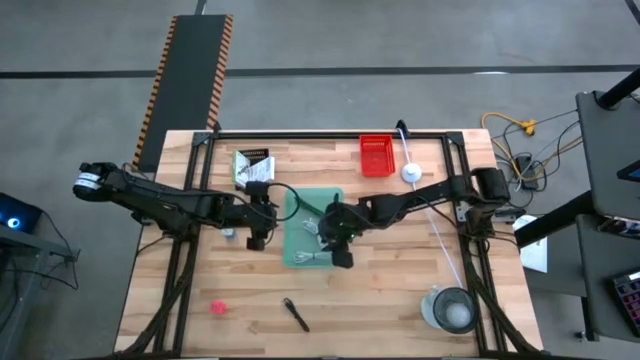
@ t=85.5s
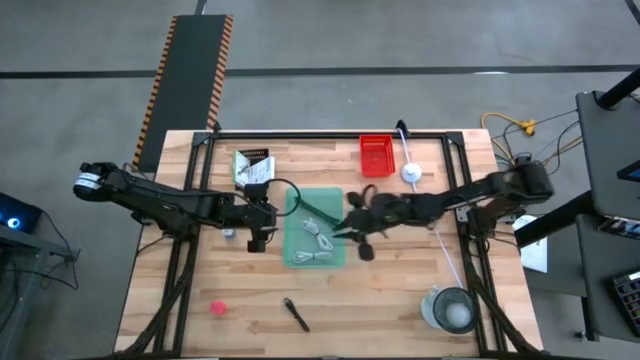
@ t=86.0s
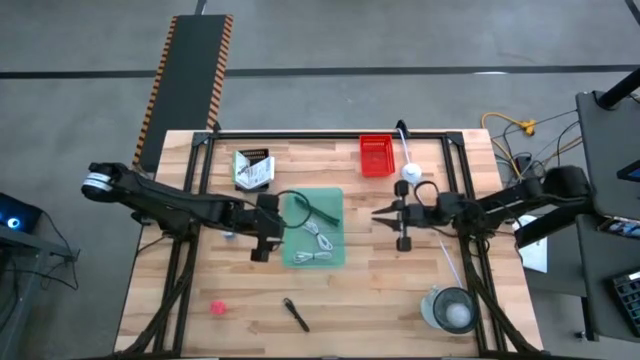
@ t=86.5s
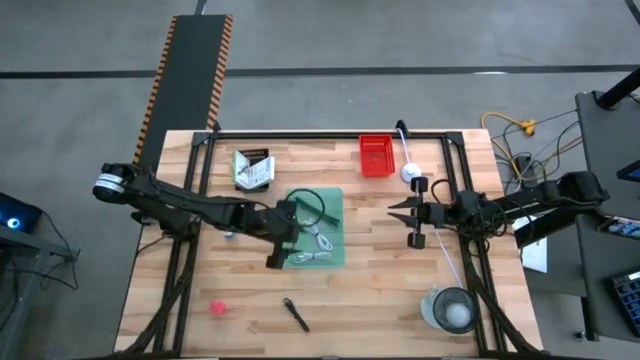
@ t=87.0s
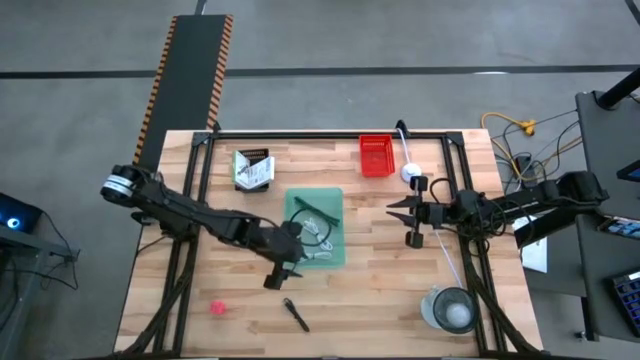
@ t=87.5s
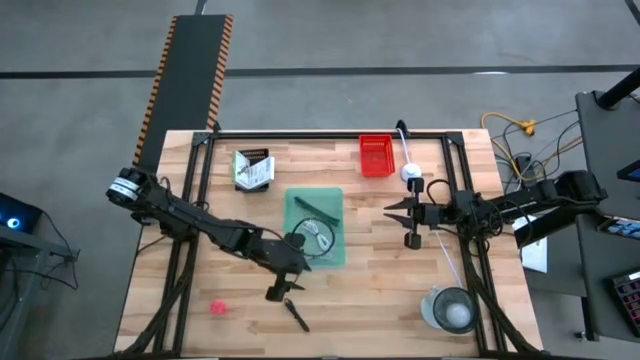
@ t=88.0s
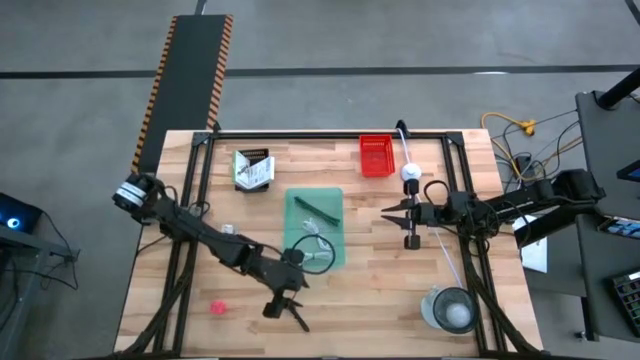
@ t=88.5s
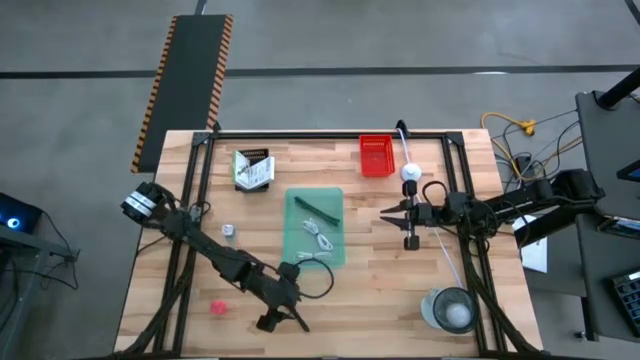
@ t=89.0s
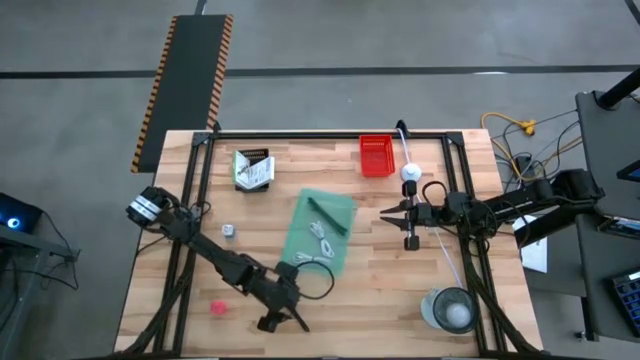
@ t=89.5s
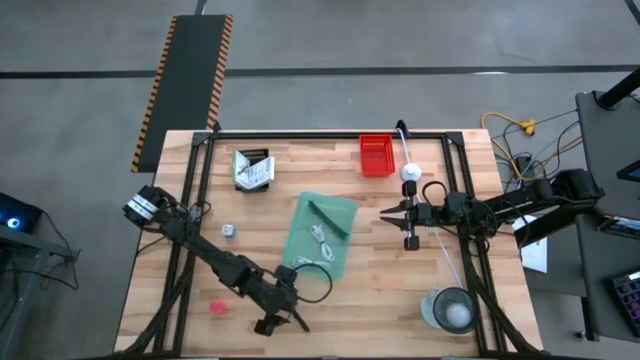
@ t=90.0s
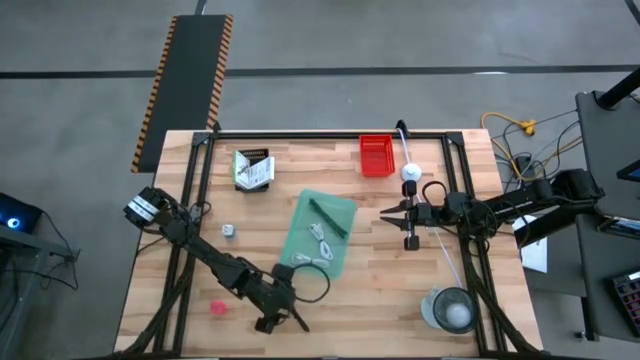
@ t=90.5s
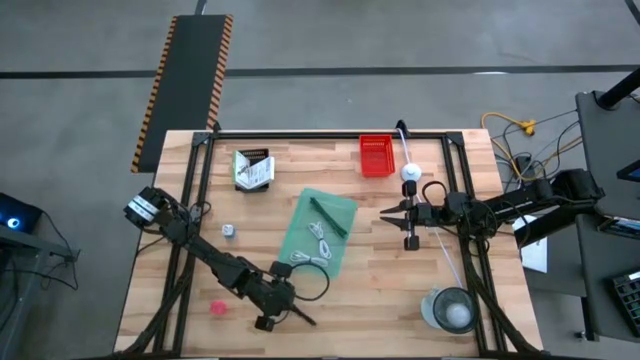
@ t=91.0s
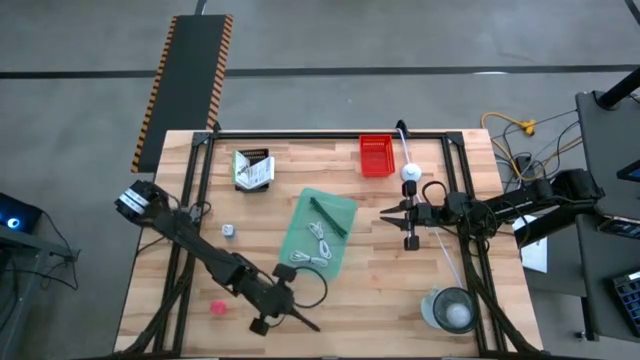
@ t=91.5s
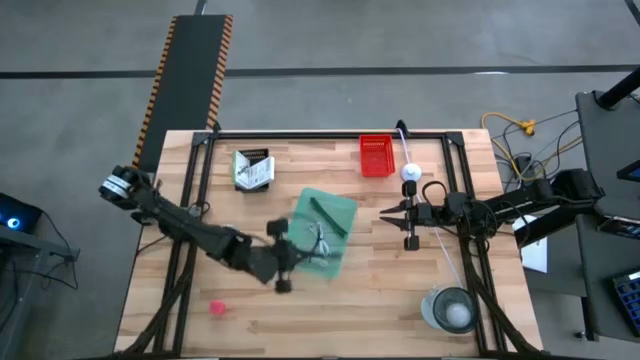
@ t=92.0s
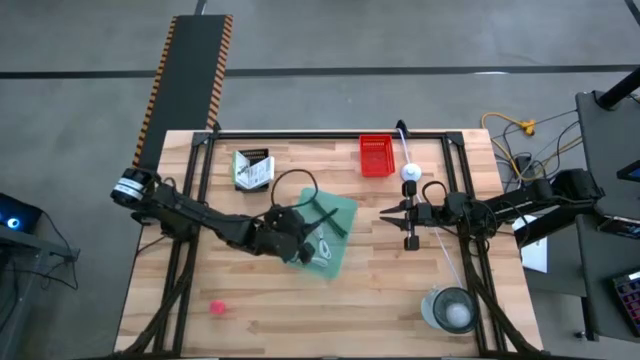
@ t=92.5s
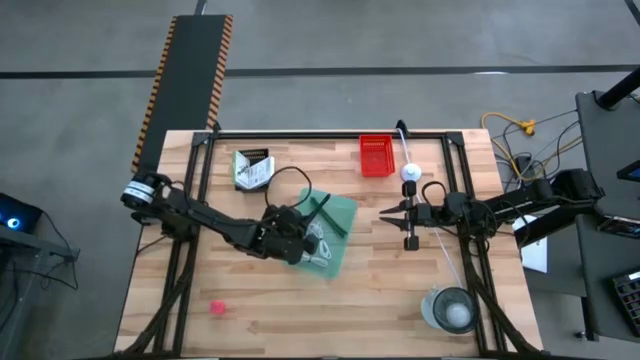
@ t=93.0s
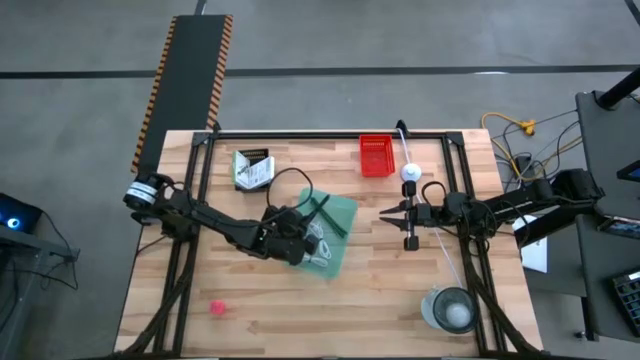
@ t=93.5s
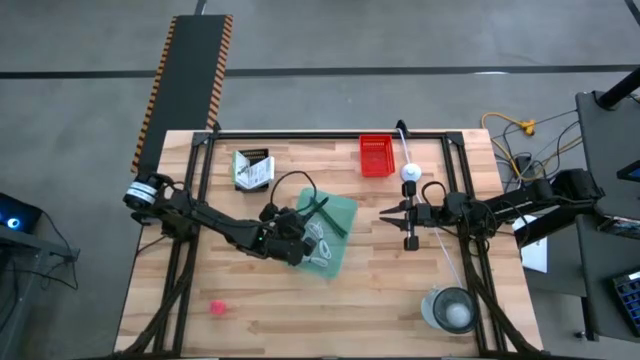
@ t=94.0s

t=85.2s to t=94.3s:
Task: Pick and place items into bin
Put the black charger cable into the blue bin

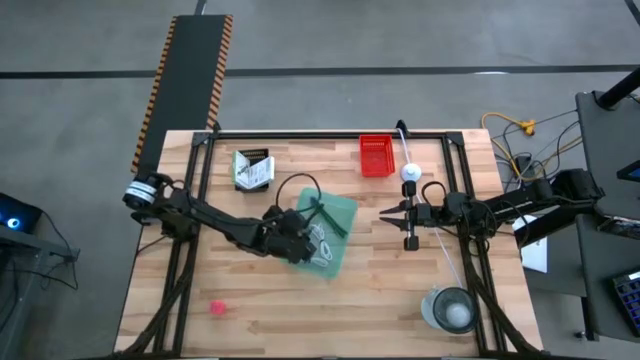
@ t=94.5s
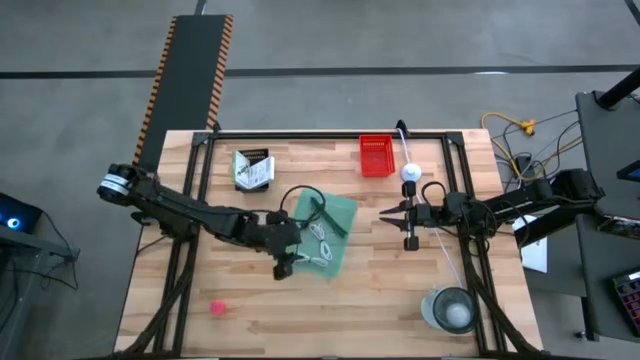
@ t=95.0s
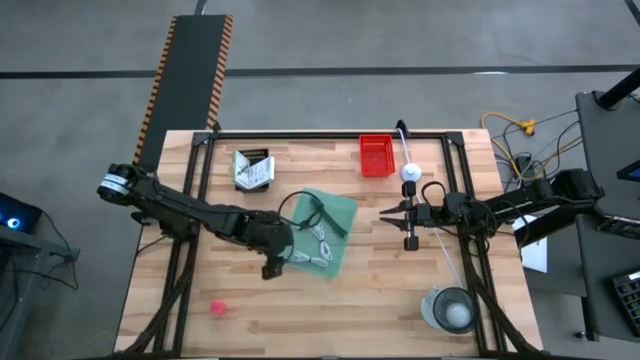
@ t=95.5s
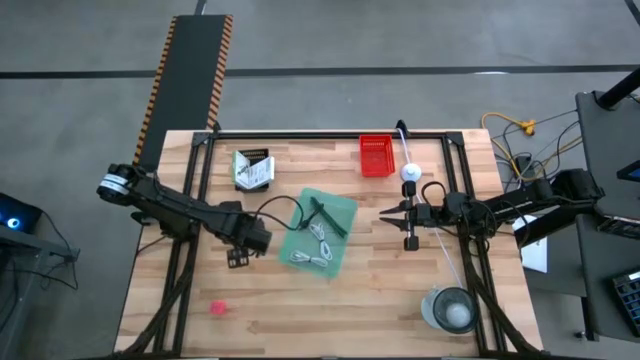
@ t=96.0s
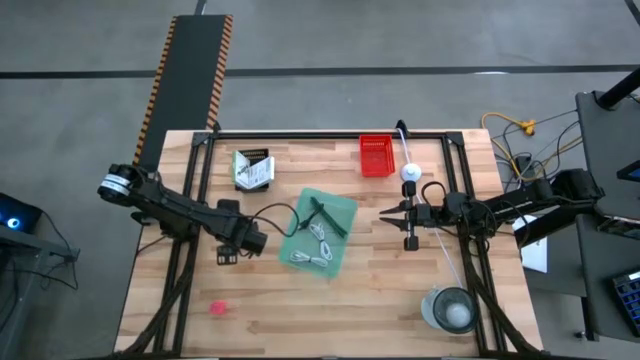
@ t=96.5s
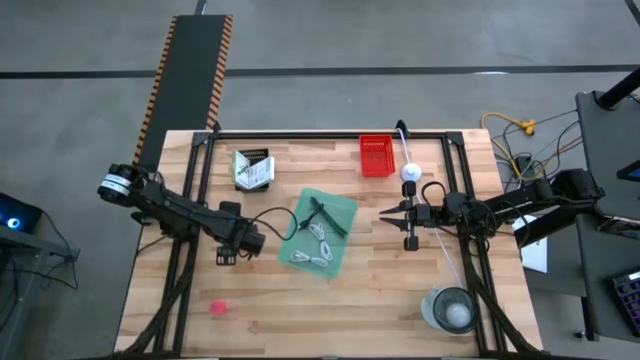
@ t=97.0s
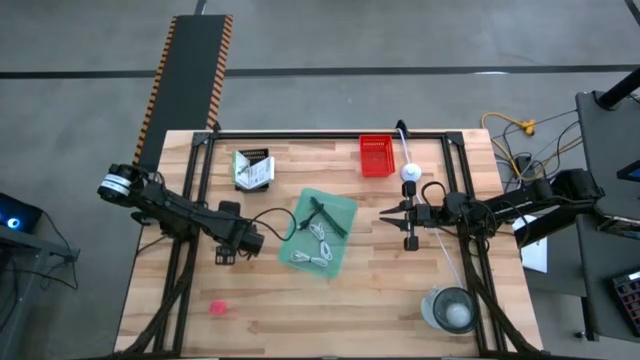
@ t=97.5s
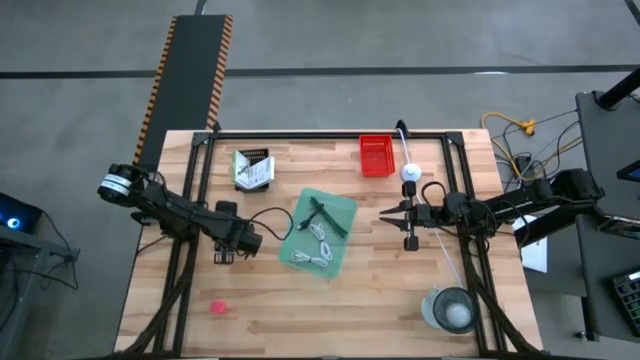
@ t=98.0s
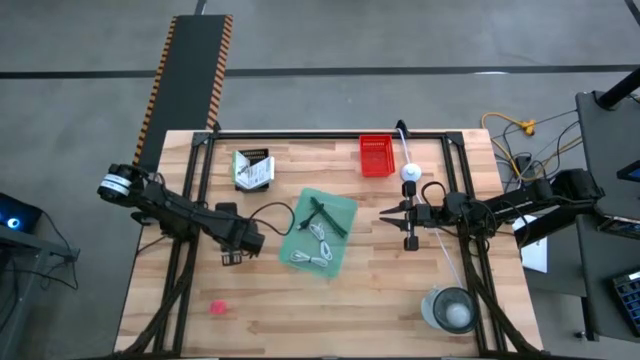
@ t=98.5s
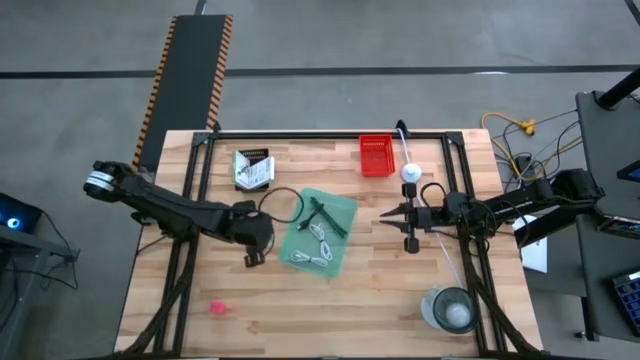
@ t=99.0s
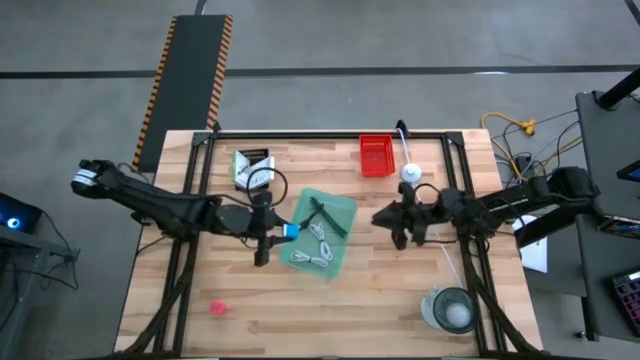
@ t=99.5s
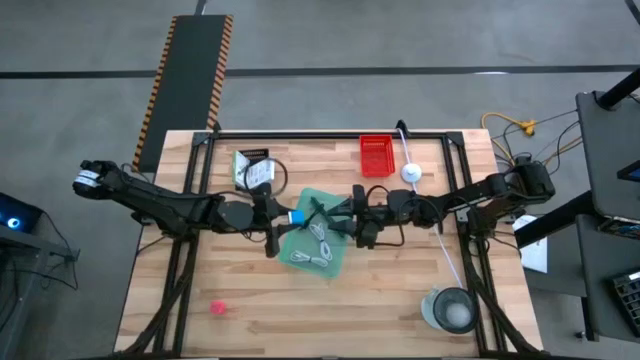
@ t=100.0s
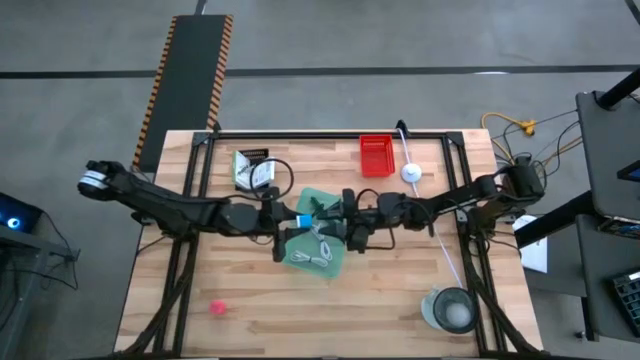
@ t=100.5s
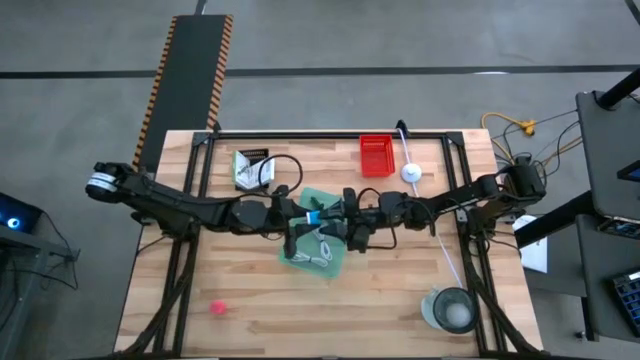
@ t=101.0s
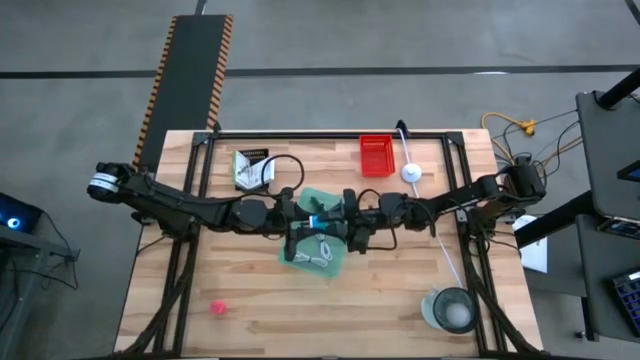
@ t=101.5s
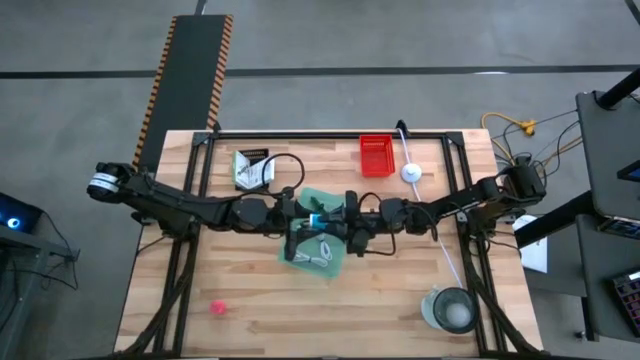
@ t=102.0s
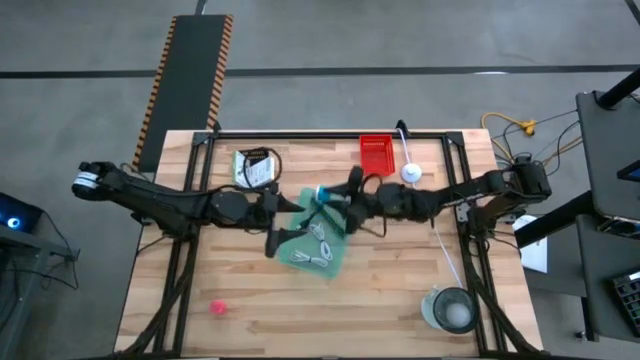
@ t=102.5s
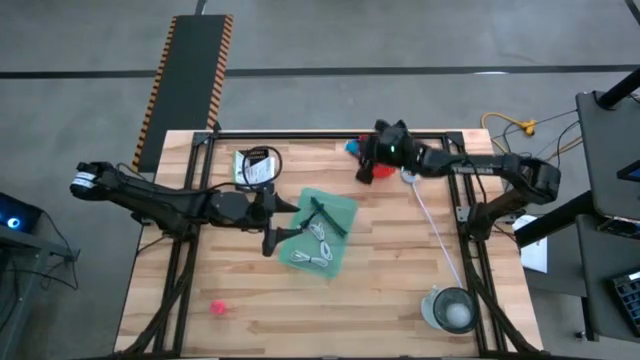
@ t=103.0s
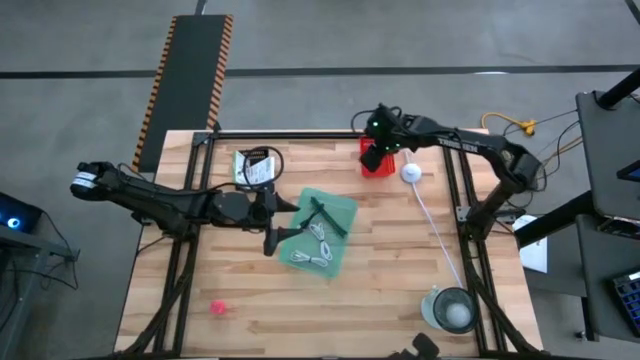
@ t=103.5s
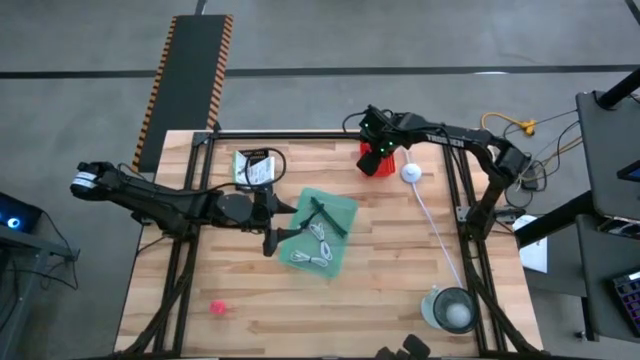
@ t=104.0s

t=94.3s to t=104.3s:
Put the blue charger adapter into the red basket

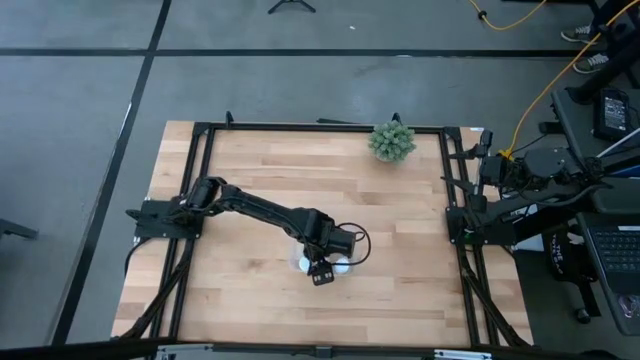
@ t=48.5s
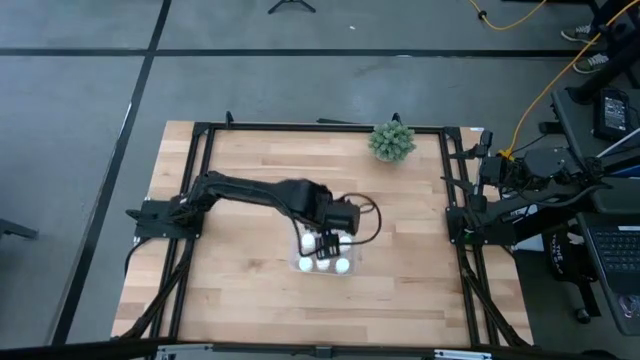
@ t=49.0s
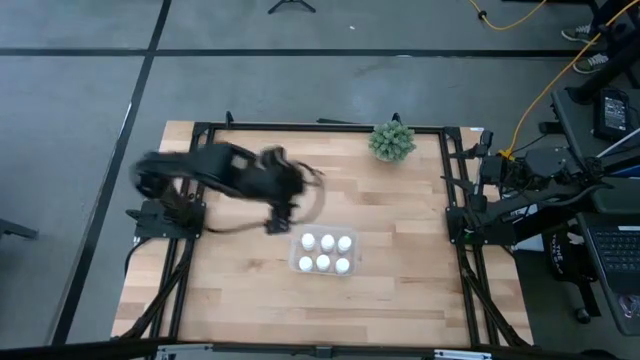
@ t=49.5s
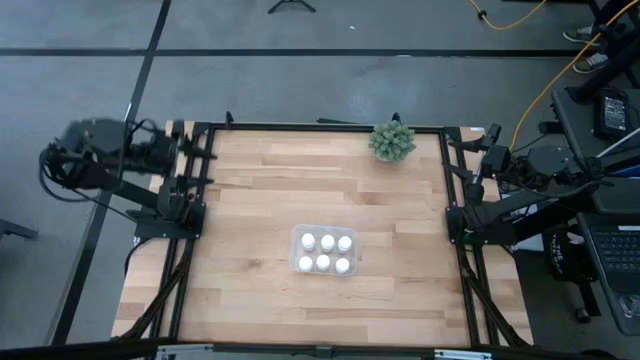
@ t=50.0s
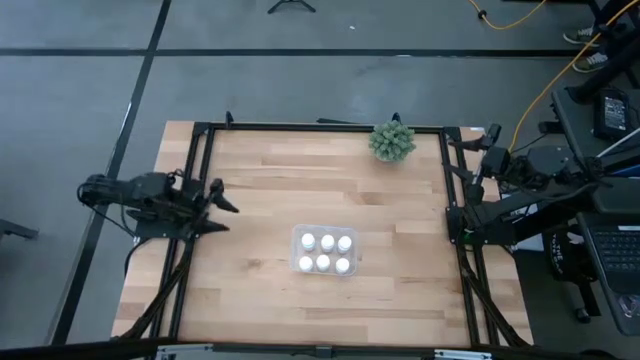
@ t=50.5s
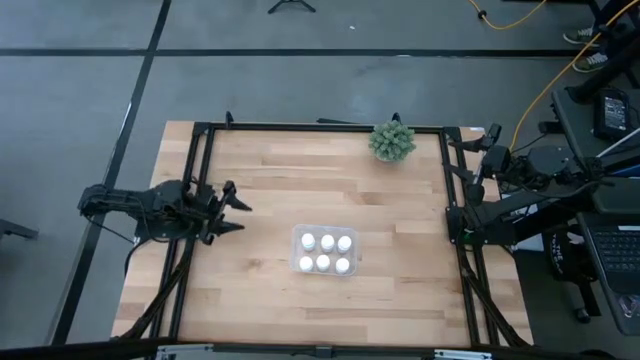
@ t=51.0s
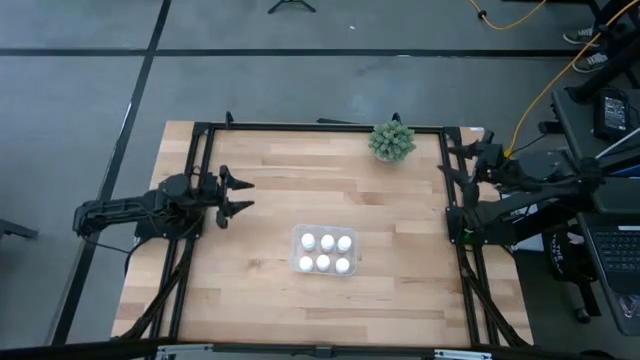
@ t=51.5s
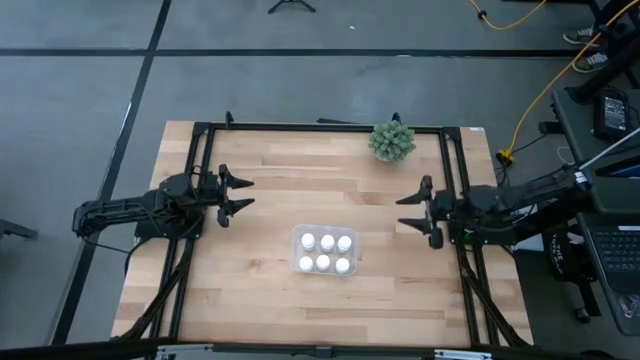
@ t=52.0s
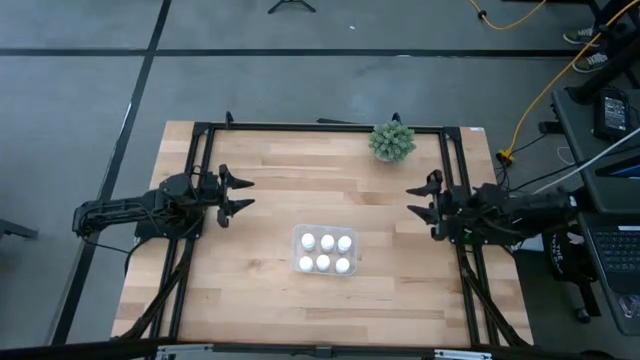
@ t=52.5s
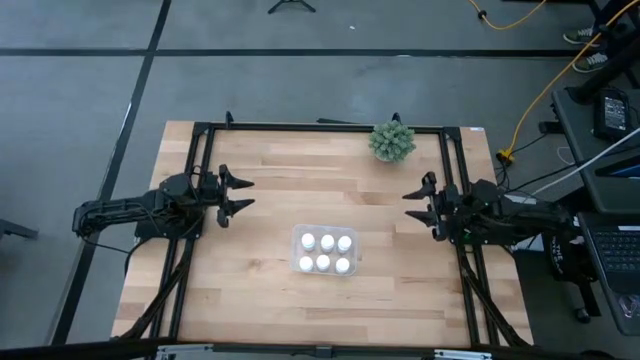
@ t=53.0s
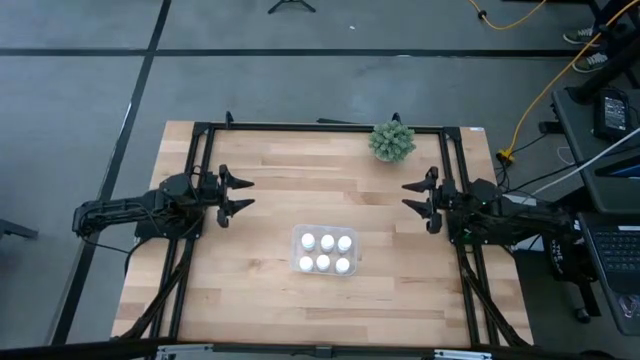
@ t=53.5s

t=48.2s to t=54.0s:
Task: Pick and place pill bottles into a basket
Return to Home Position
